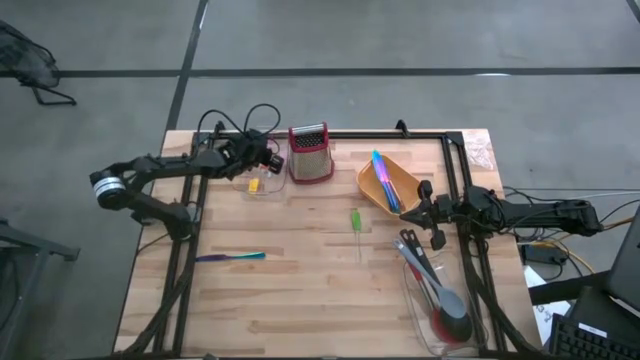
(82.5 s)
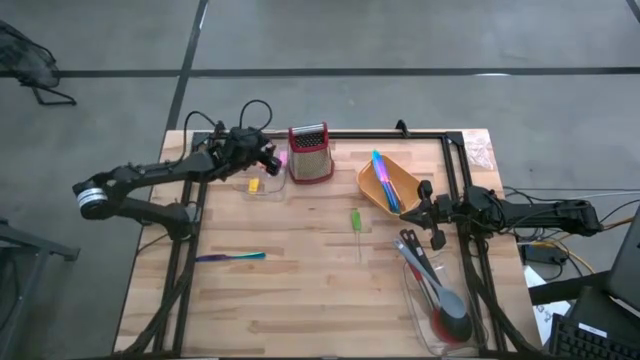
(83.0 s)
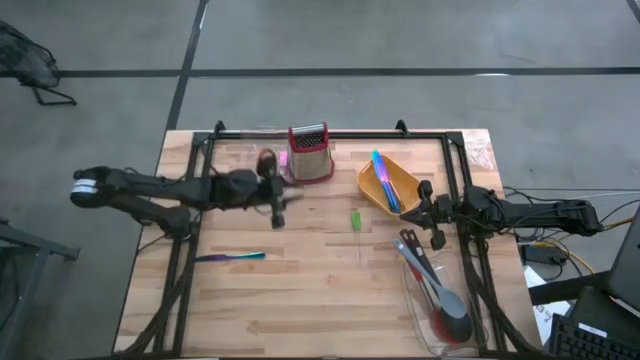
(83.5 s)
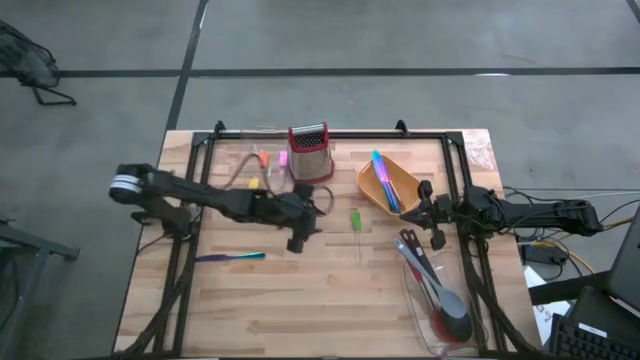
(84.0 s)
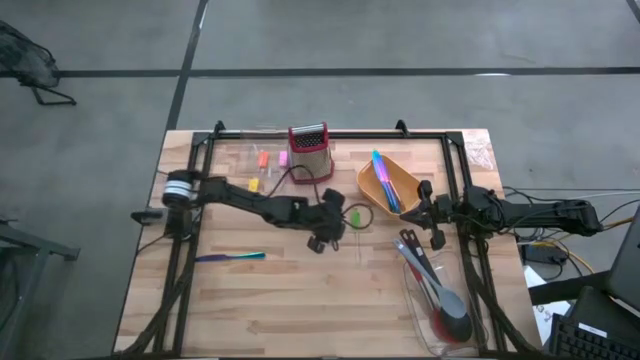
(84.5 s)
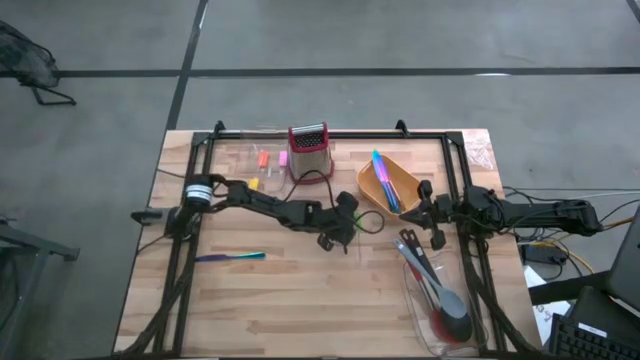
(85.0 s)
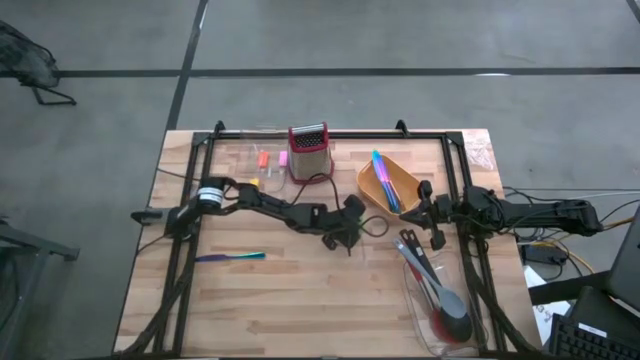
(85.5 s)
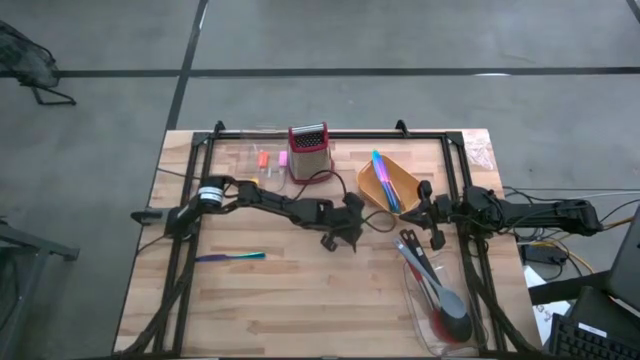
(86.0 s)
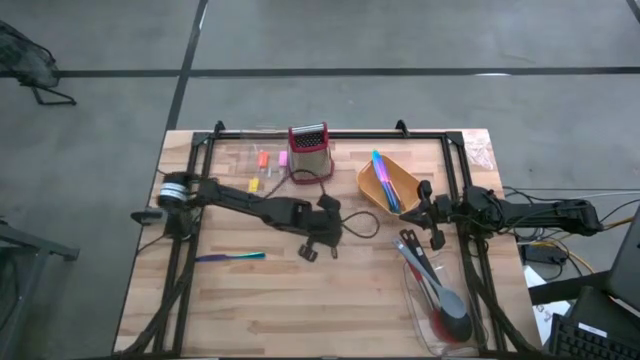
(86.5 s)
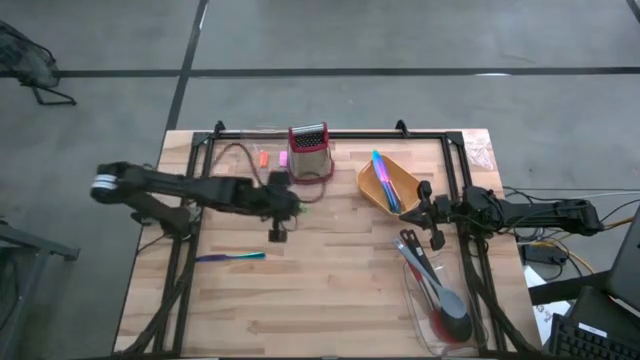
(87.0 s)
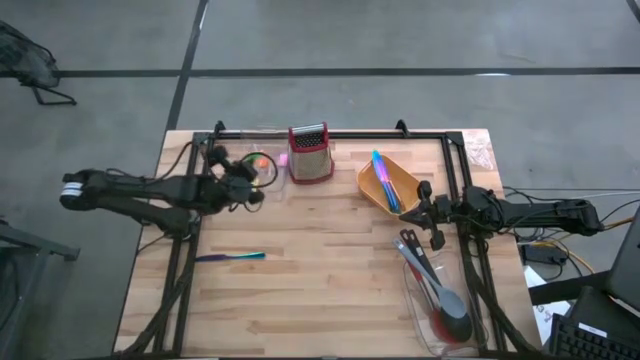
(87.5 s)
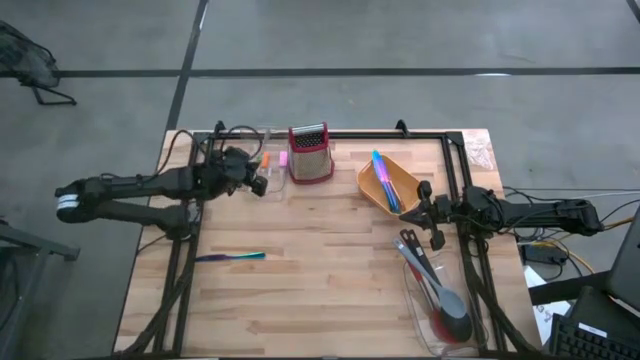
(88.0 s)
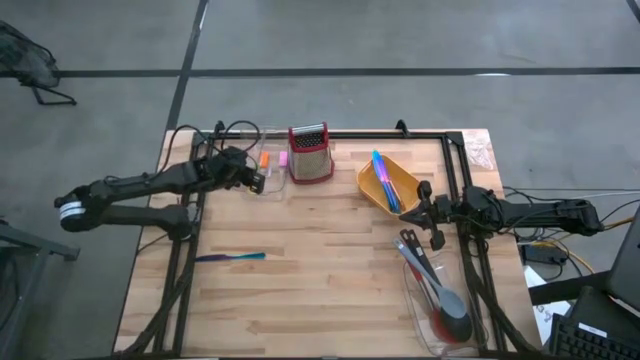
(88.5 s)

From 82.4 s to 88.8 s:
Task: Pick & Place Kitchen Items
Put the green spatula into the top transparent bin

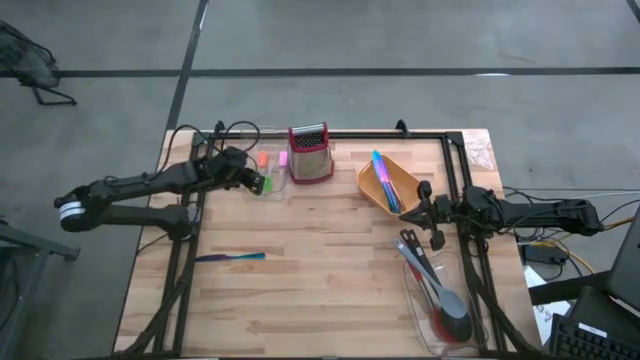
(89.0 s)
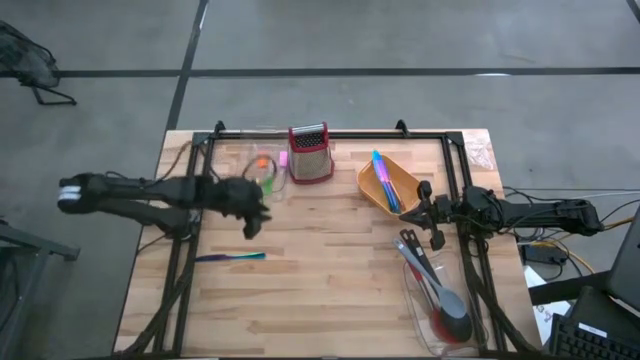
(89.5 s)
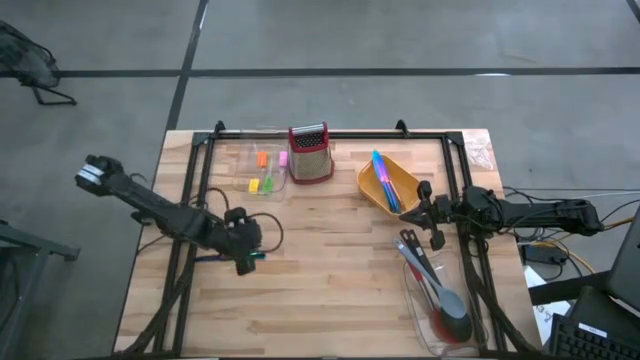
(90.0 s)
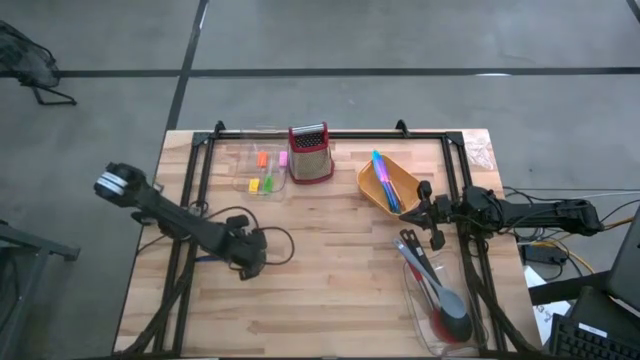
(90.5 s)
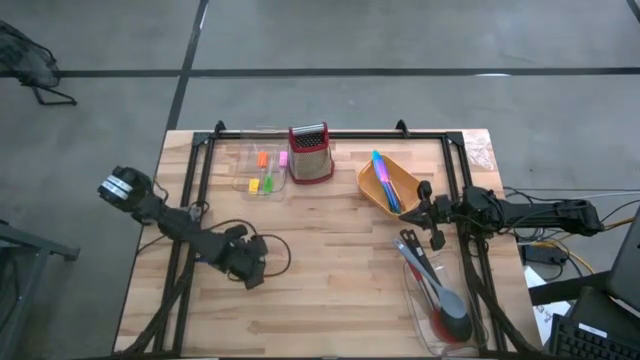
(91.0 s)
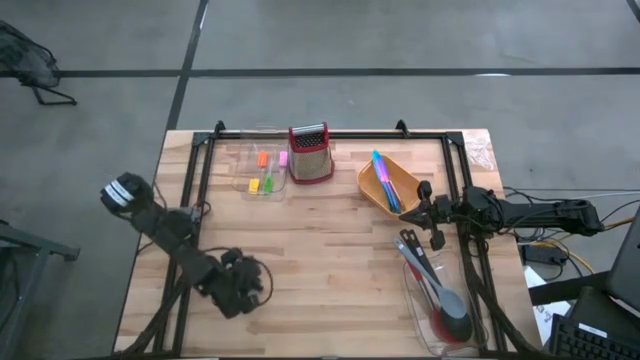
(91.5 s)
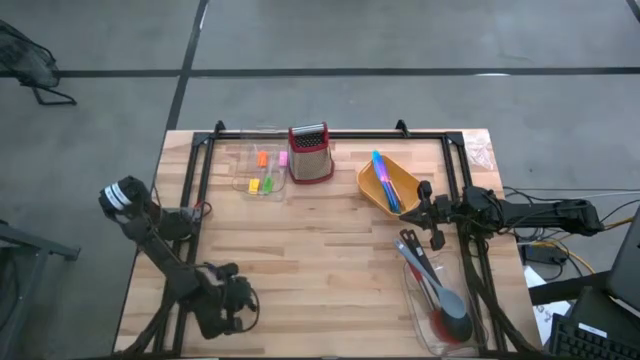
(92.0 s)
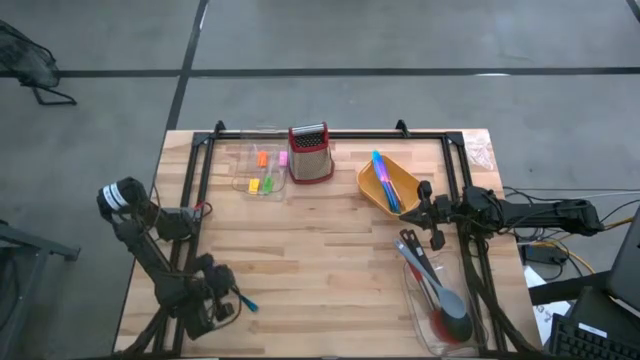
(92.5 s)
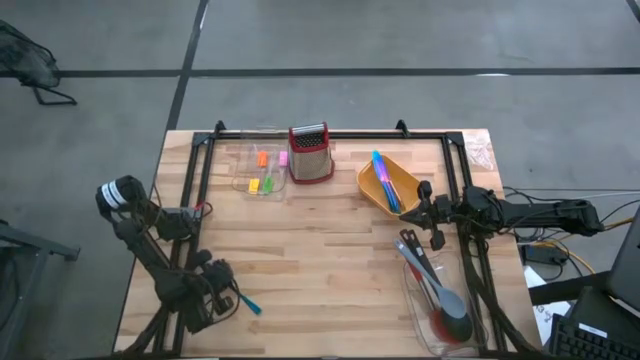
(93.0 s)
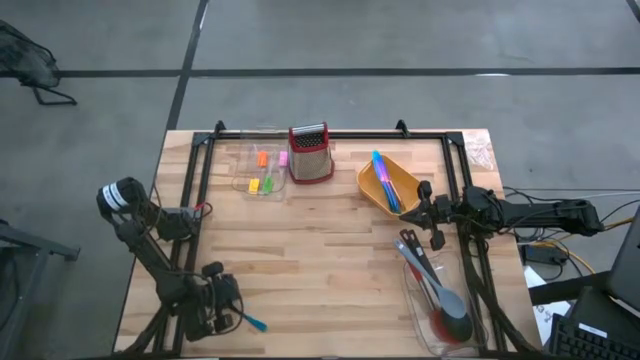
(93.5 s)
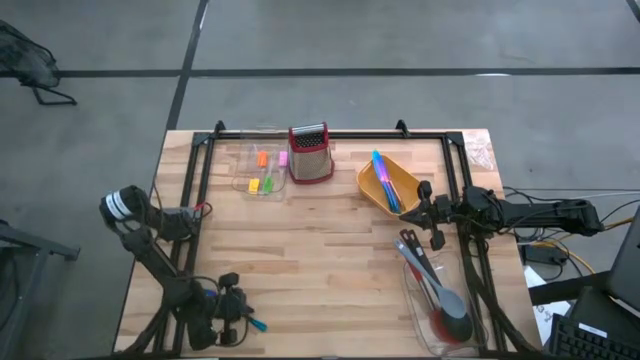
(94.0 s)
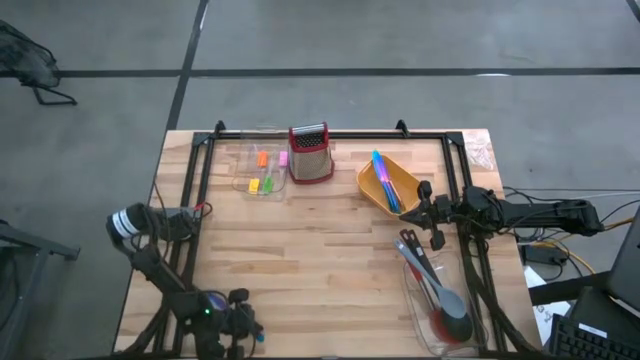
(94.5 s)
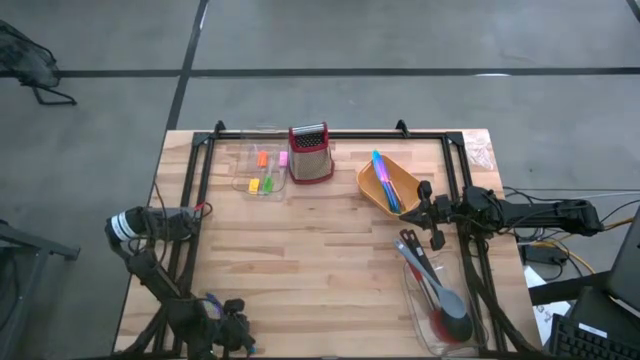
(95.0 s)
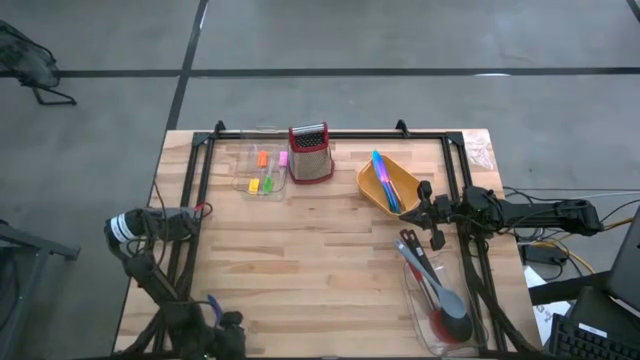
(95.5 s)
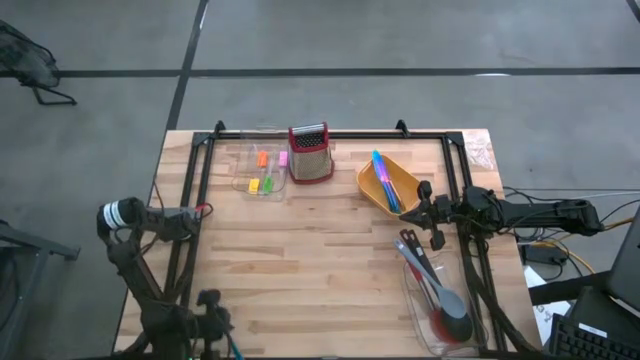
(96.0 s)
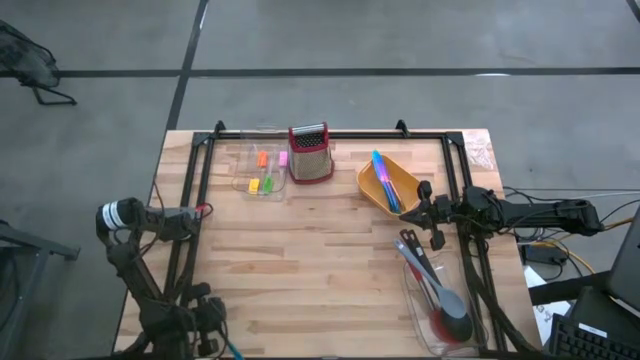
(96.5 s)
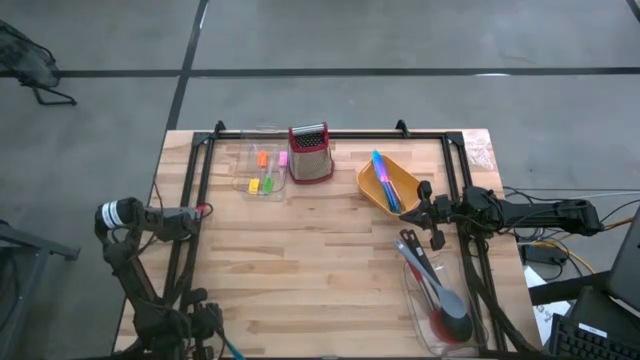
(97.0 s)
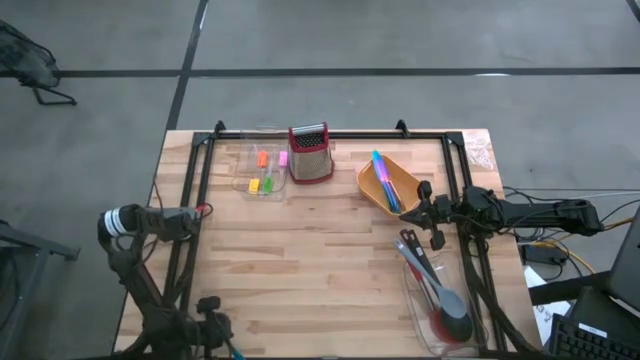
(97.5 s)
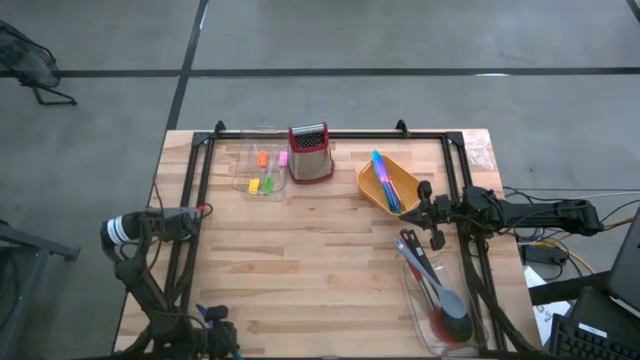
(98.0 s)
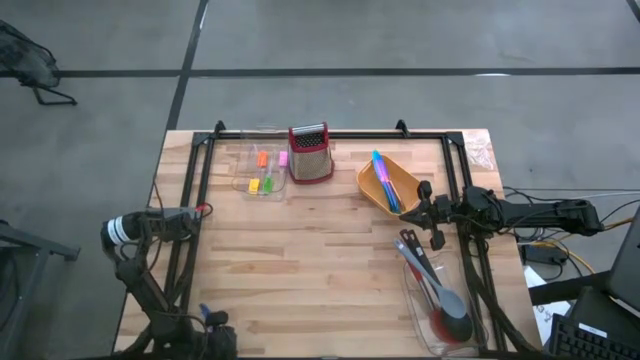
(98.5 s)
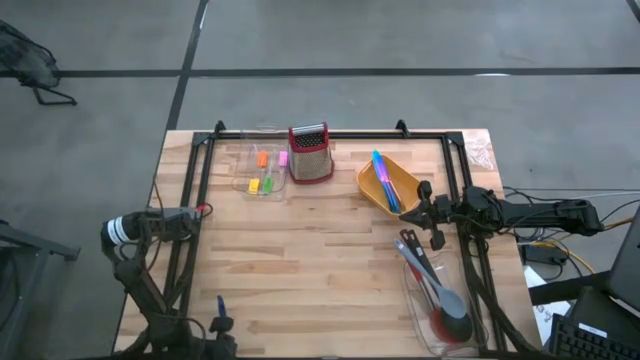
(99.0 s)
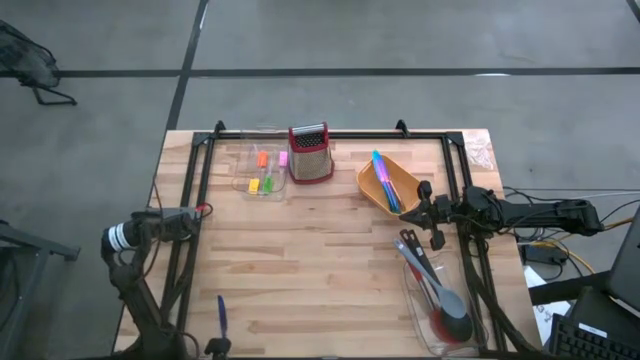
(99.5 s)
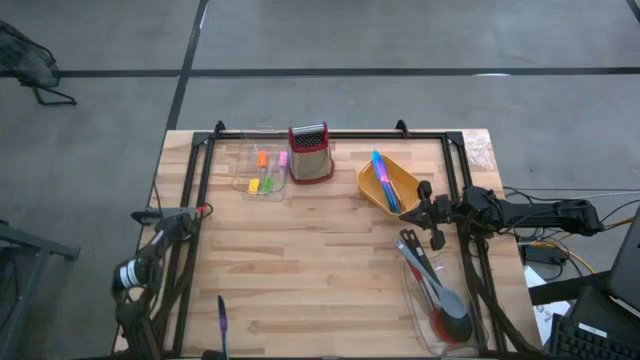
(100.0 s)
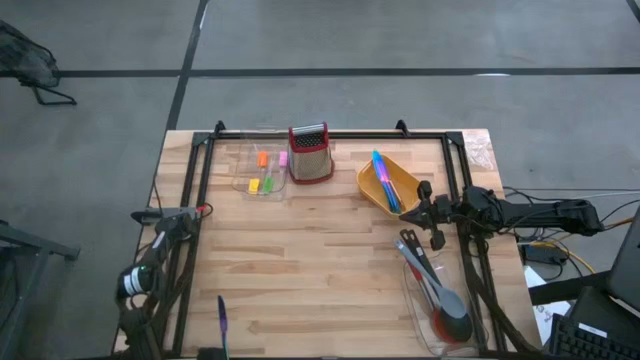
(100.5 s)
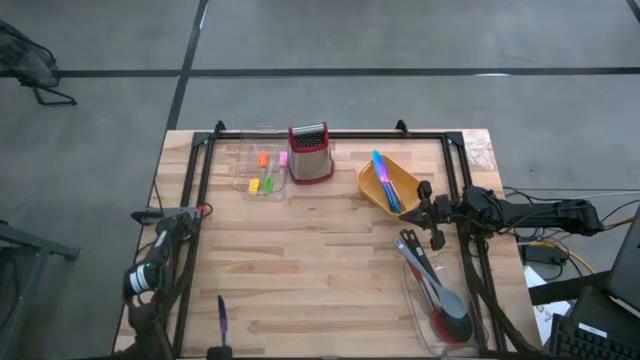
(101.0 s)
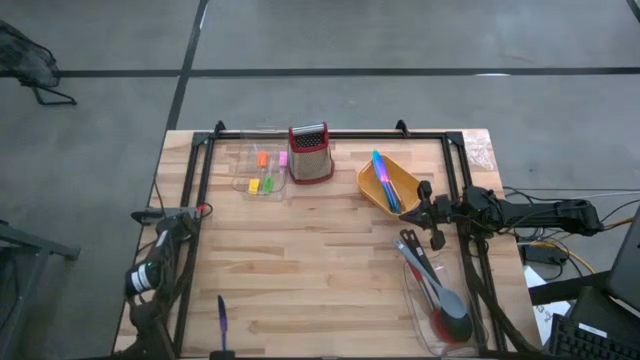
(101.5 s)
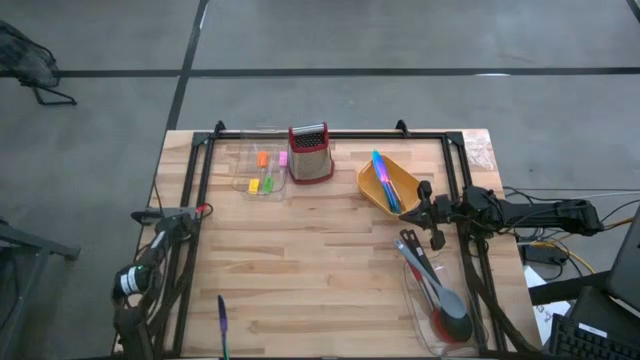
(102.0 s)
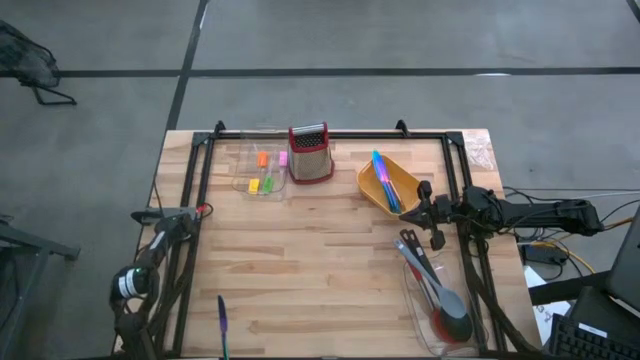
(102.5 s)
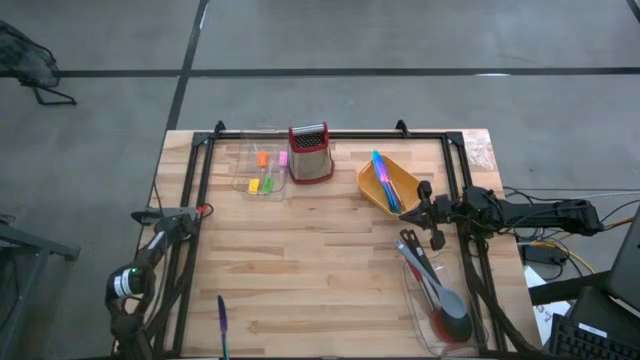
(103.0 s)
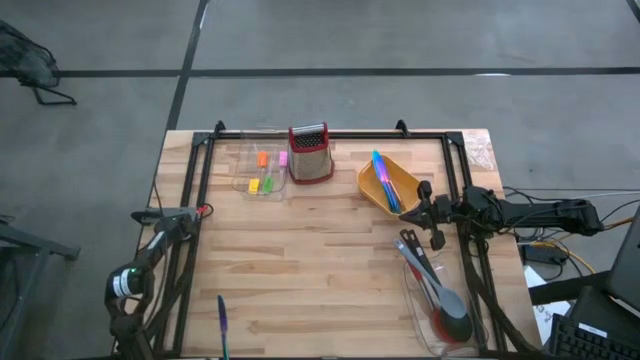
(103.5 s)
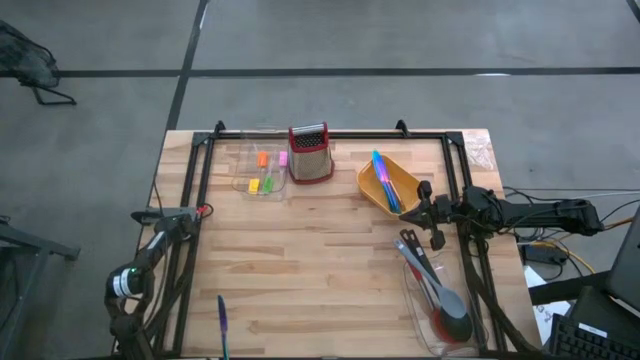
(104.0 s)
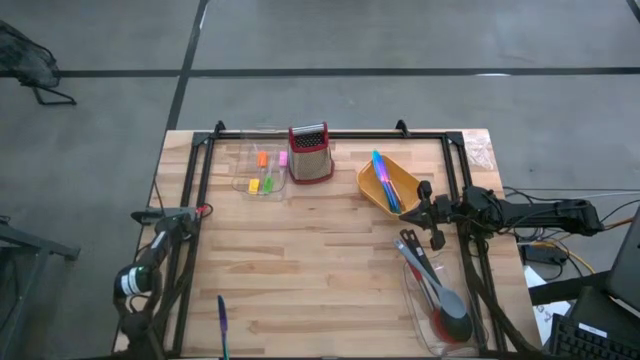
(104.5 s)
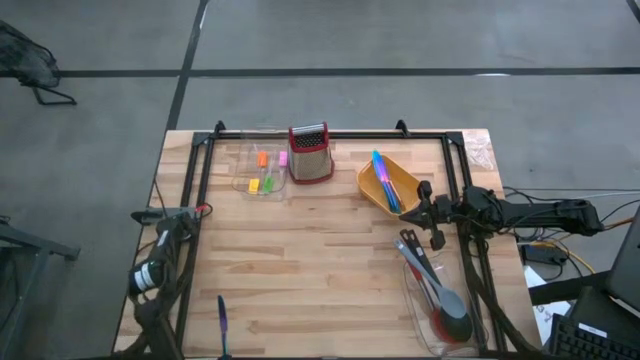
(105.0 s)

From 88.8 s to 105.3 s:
Put the blue table knife into the orange bin
